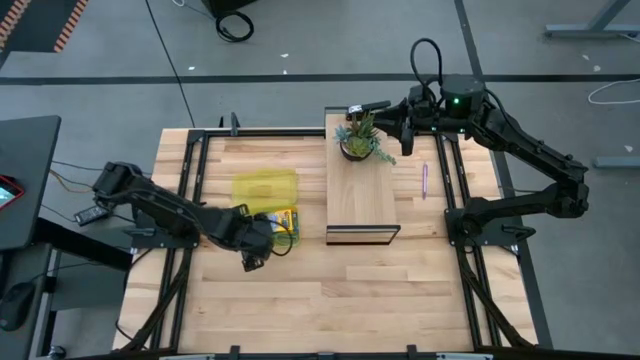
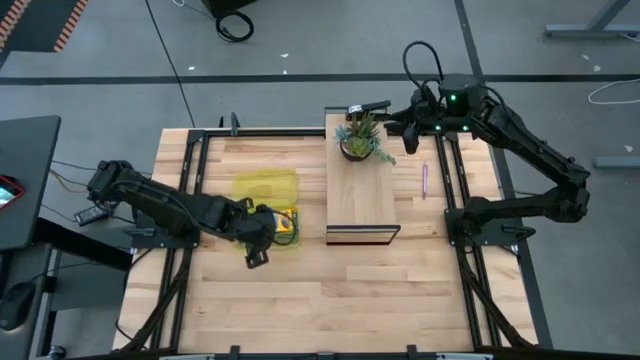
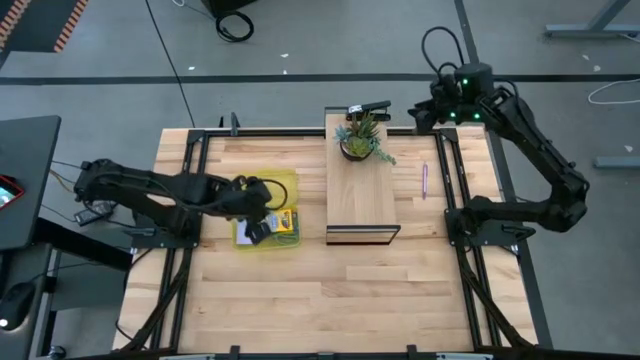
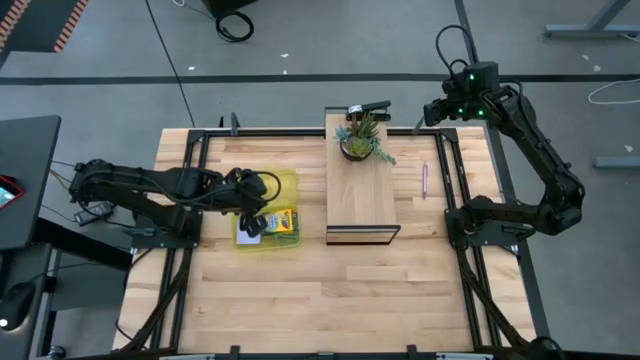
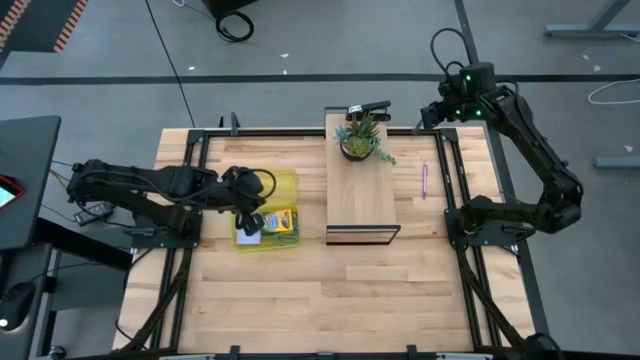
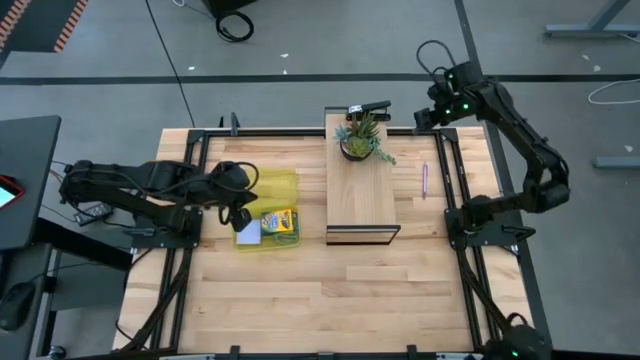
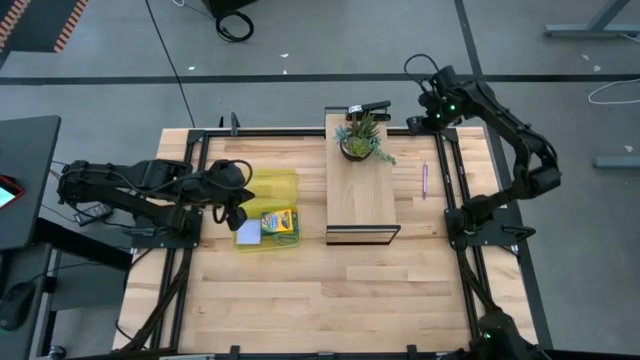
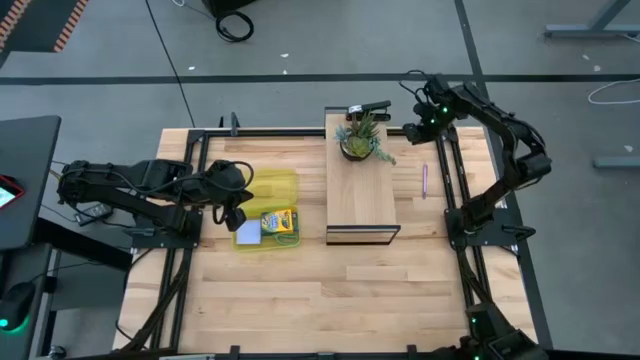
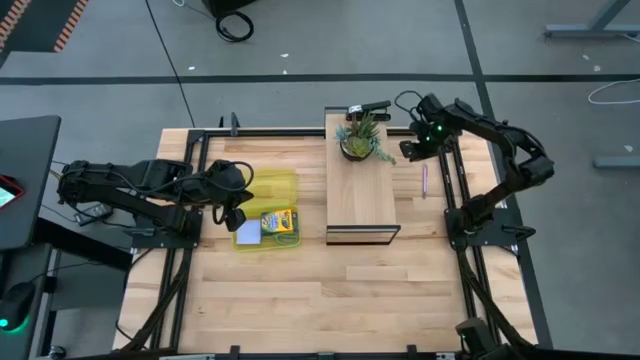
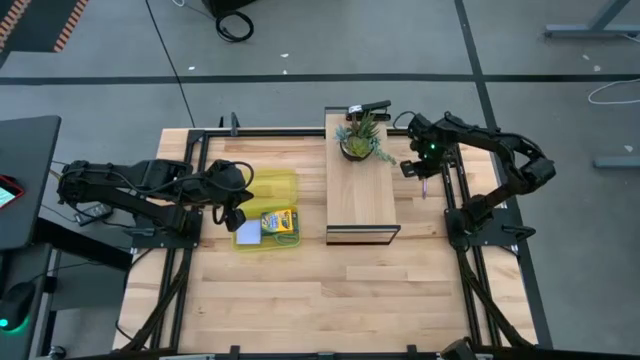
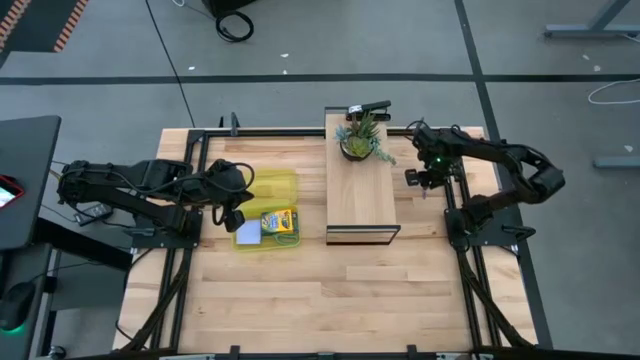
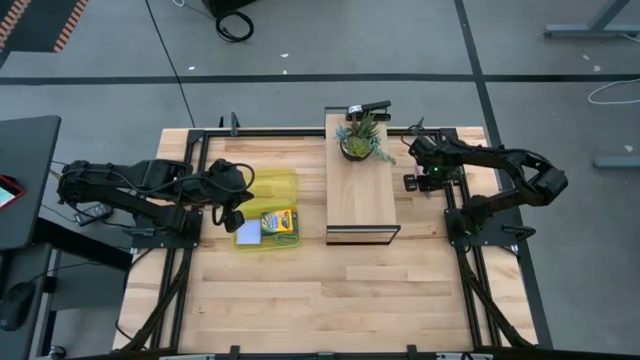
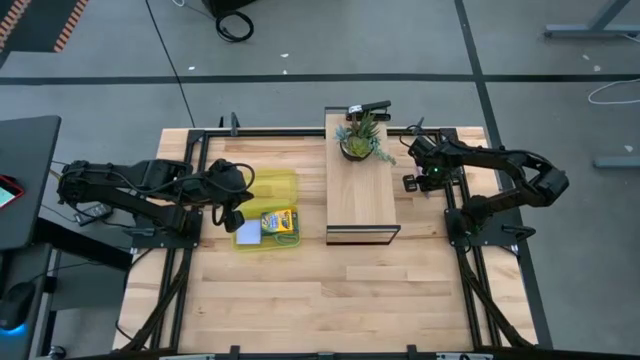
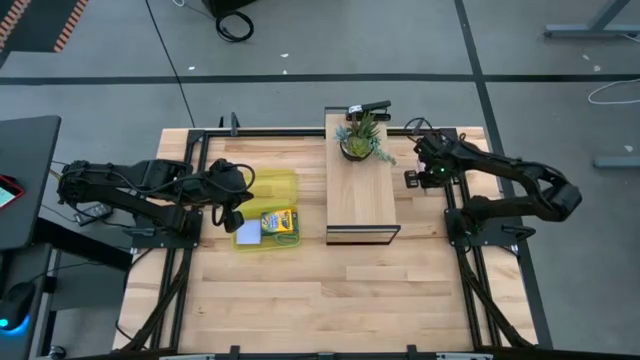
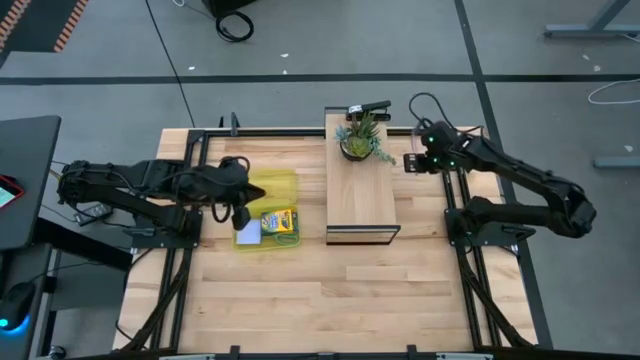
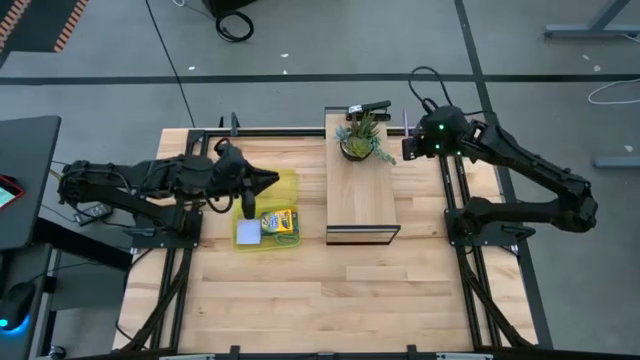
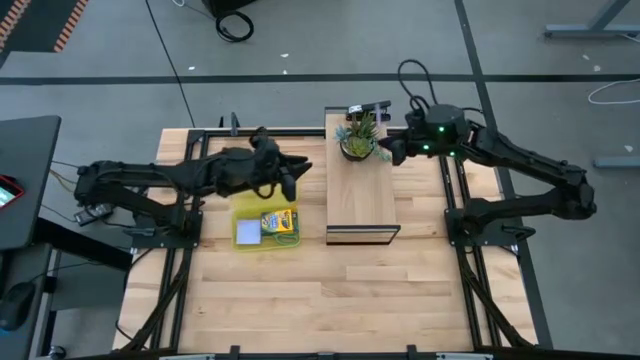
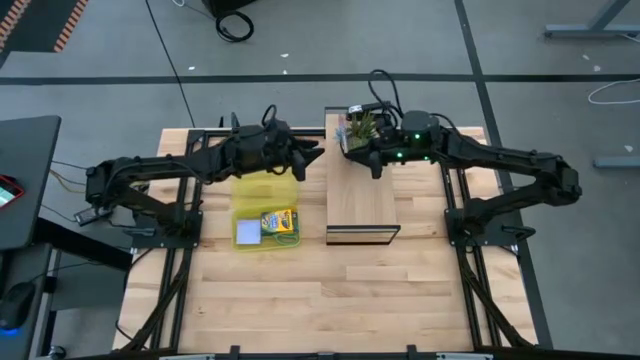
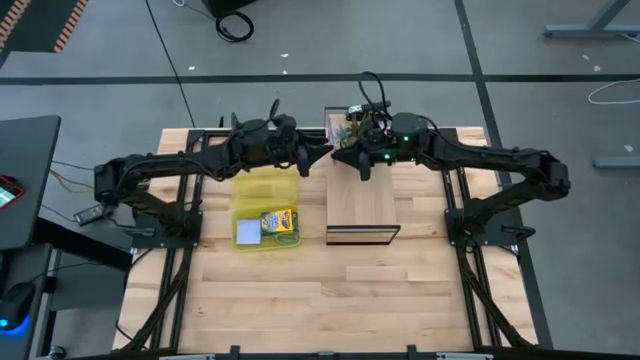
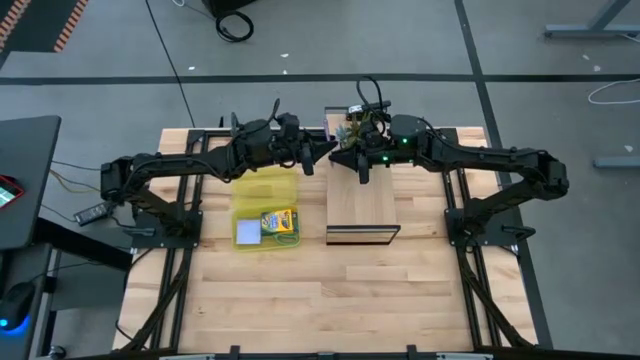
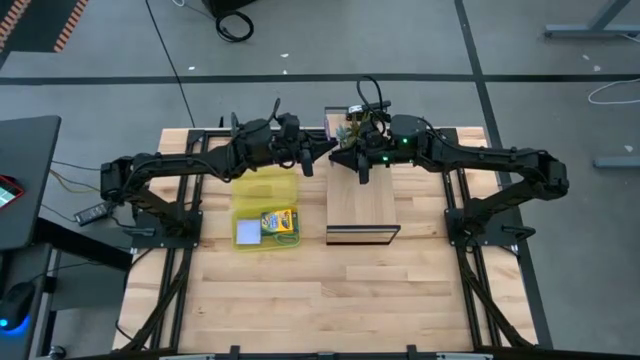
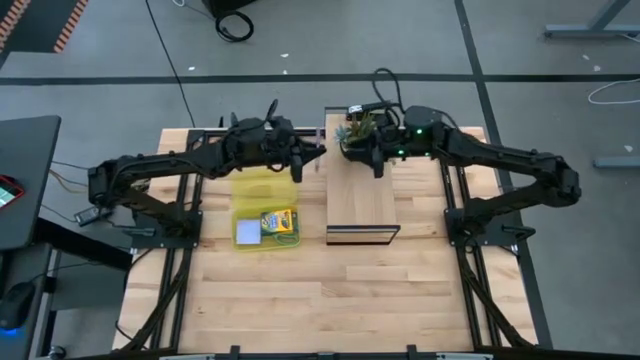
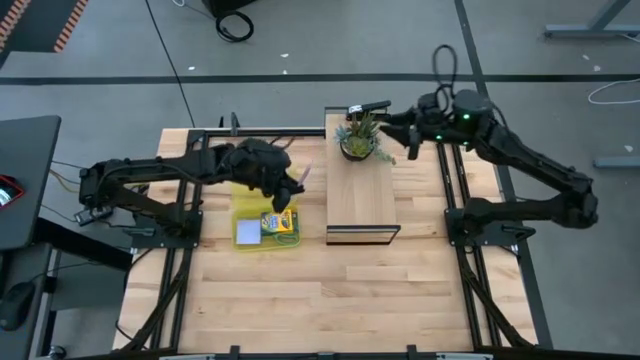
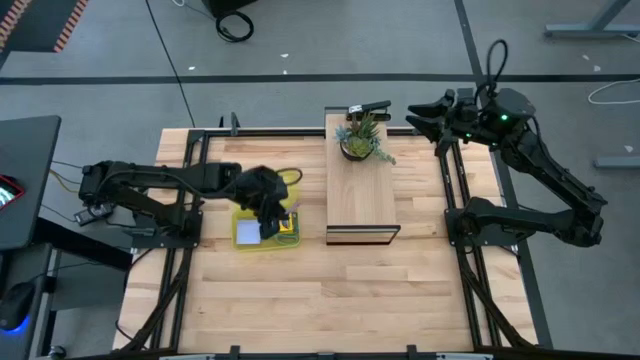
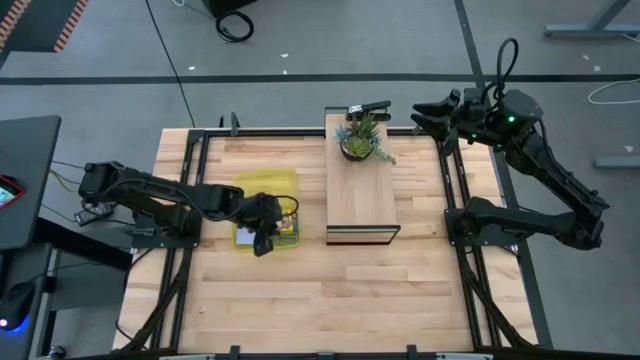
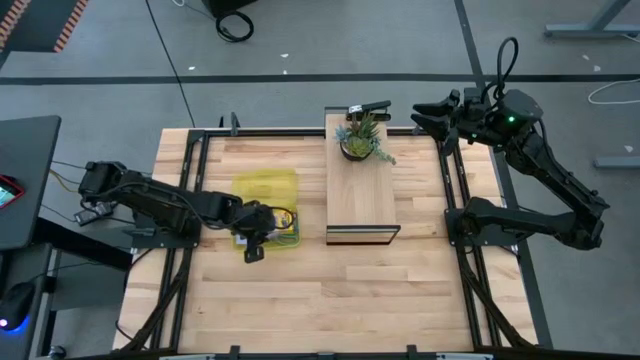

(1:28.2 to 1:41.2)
Task: Pack school essentials
Put the pink pen into the yellow supply box

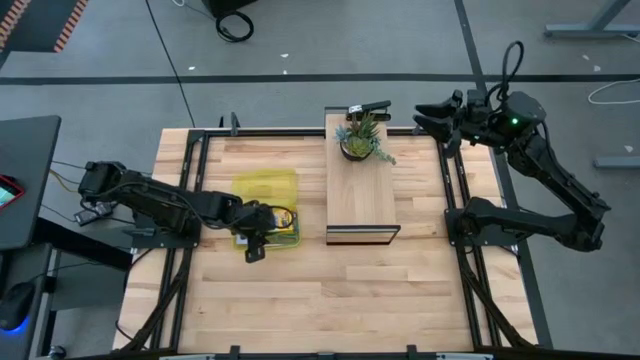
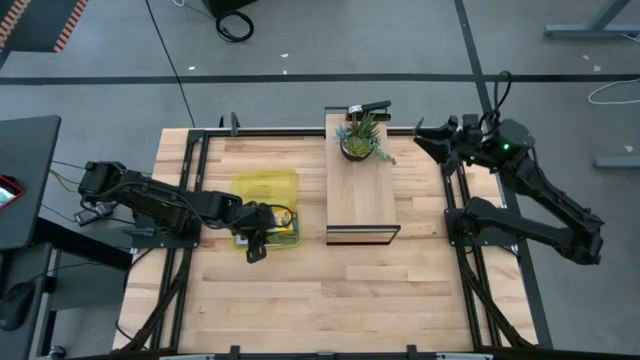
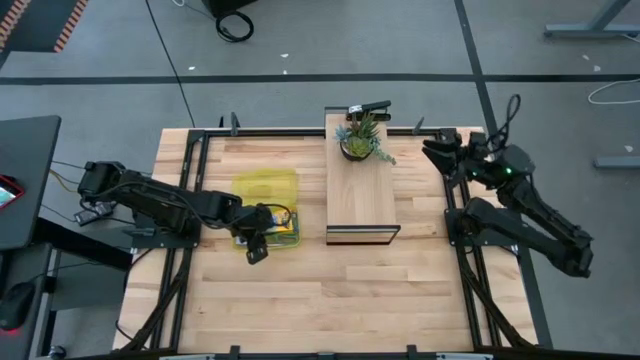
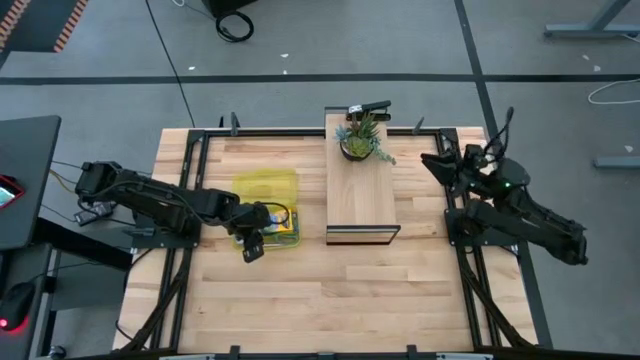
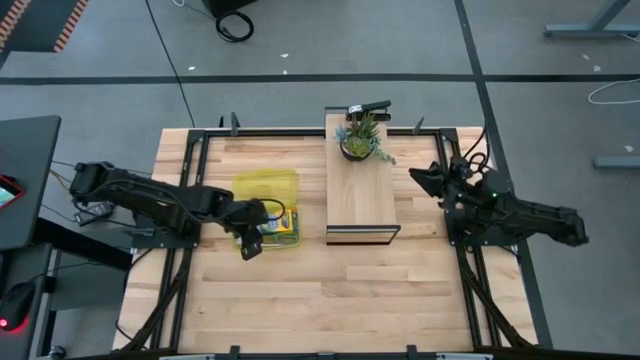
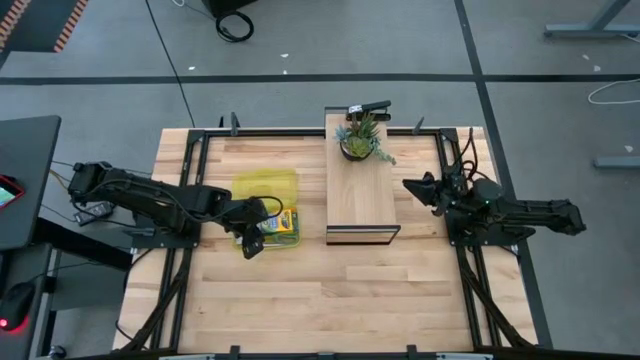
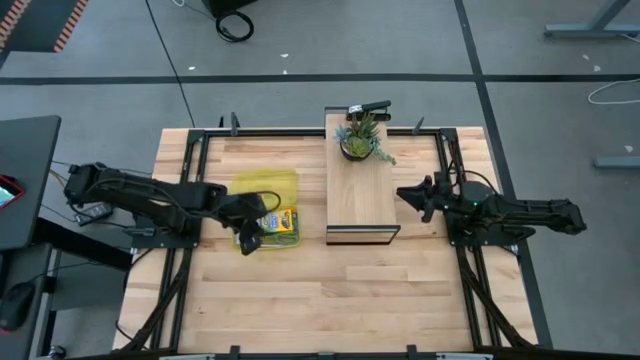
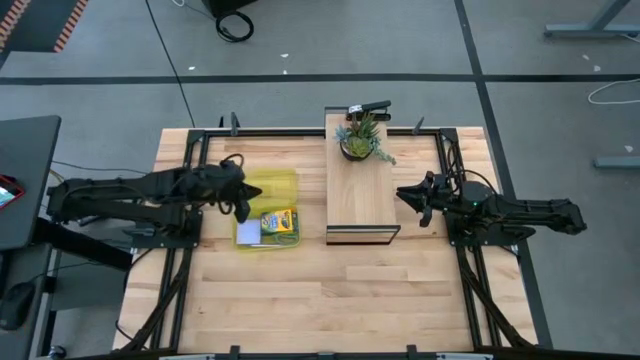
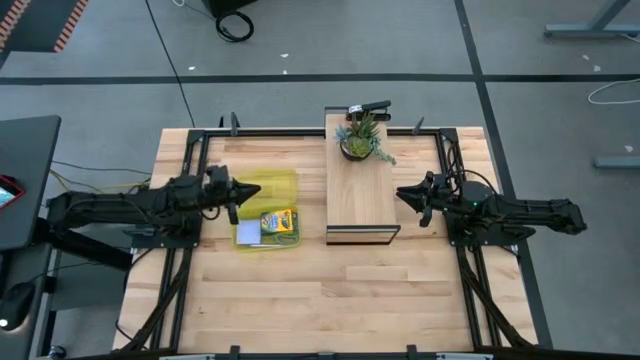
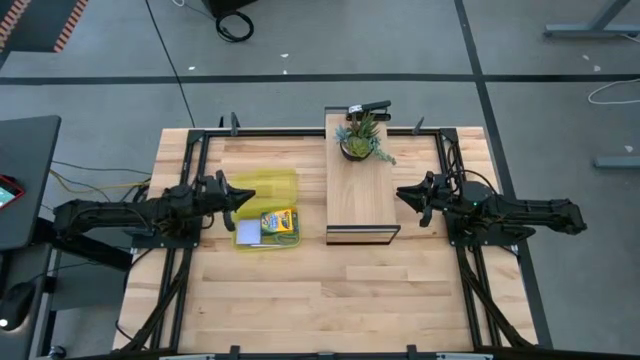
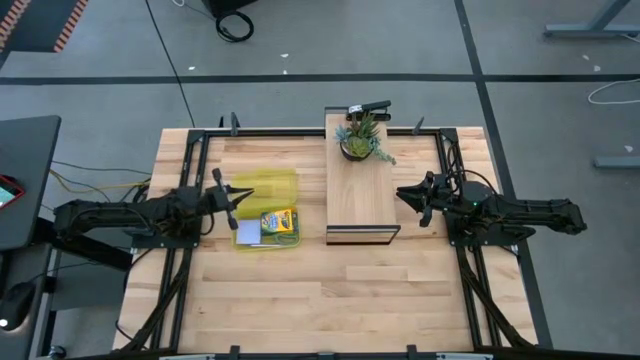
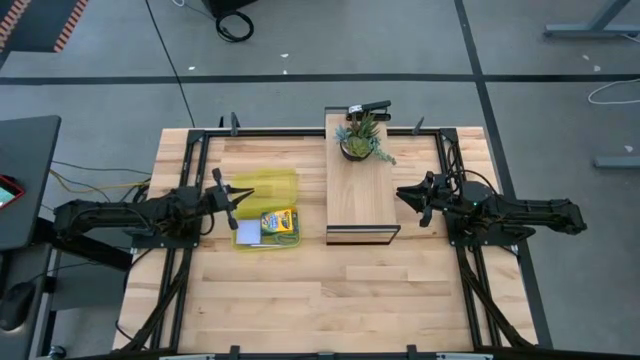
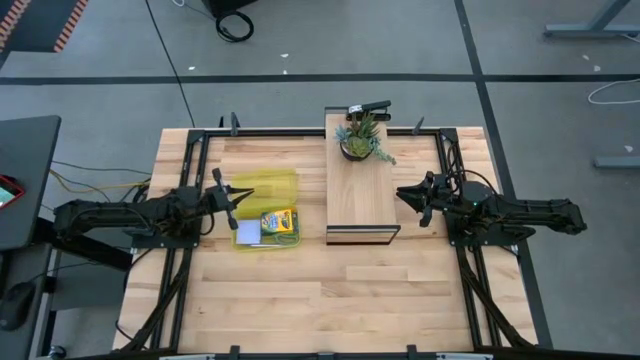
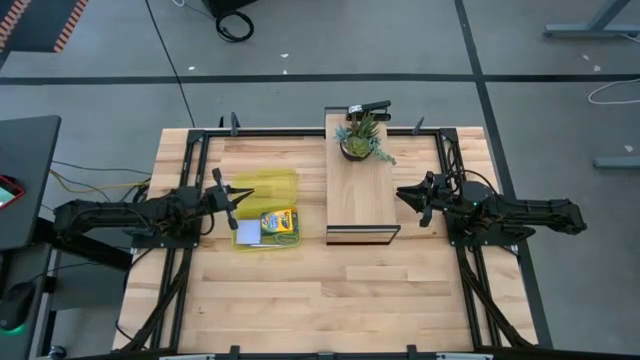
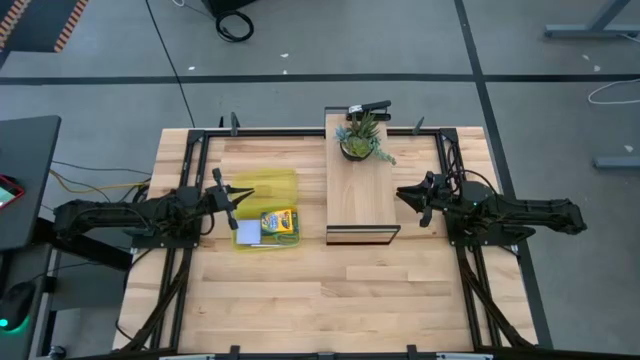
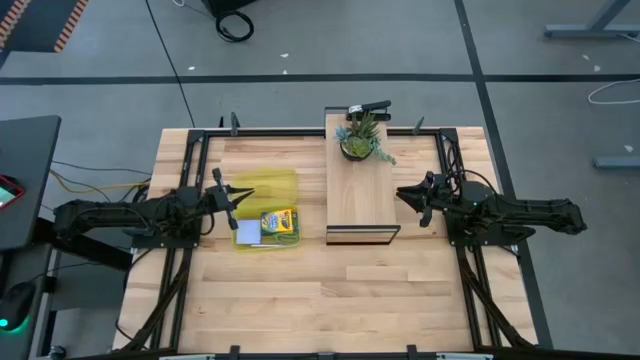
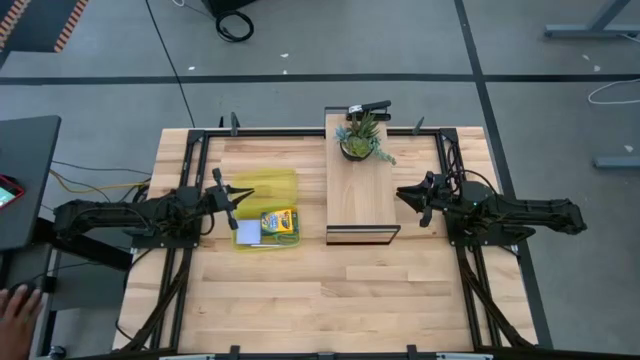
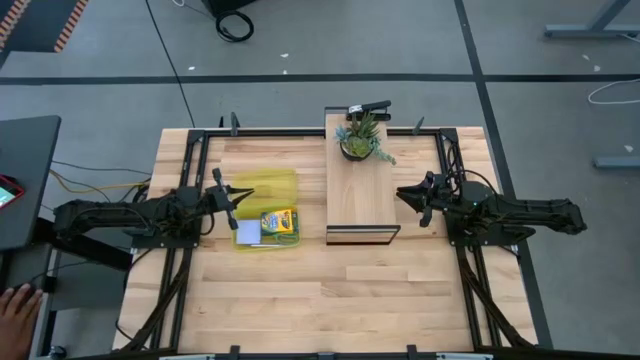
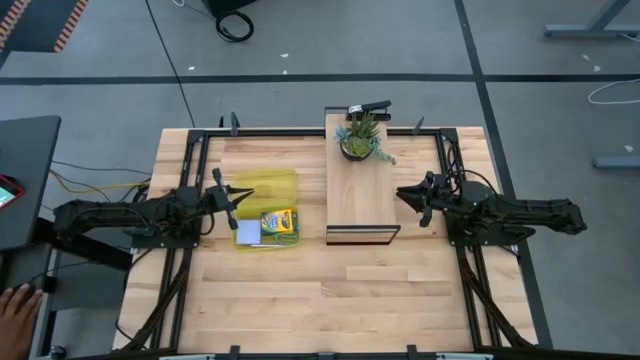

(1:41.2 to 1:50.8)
Return to Home Position
